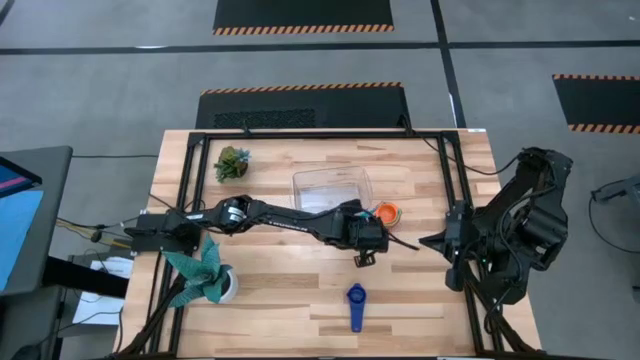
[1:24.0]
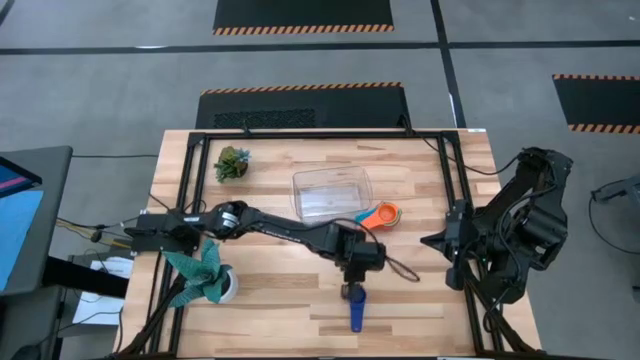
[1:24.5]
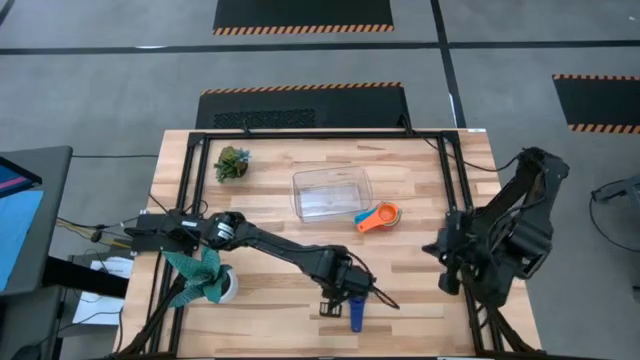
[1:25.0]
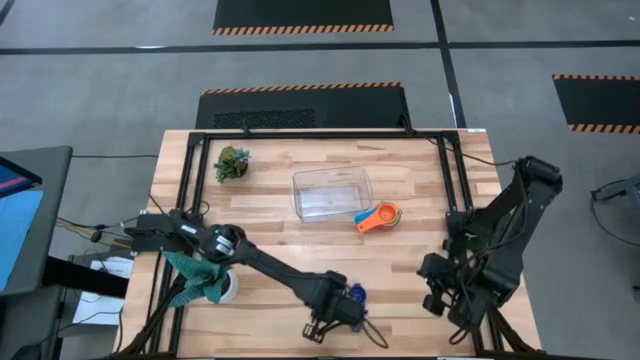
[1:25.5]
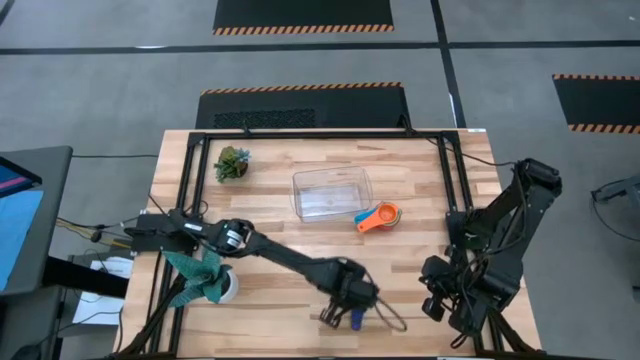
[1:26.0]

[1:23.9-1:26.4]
Task: Nest measuring cups in basket
Stack the dark blue measuring cup on top of the orange measuring cup

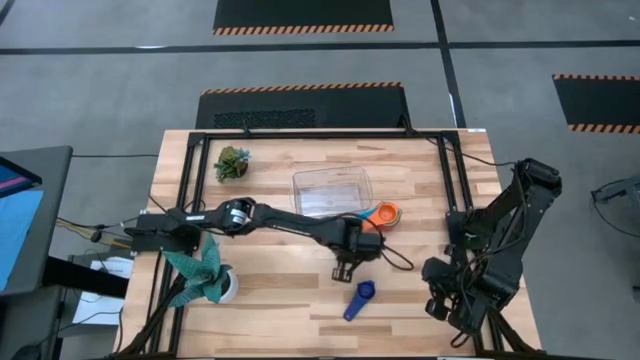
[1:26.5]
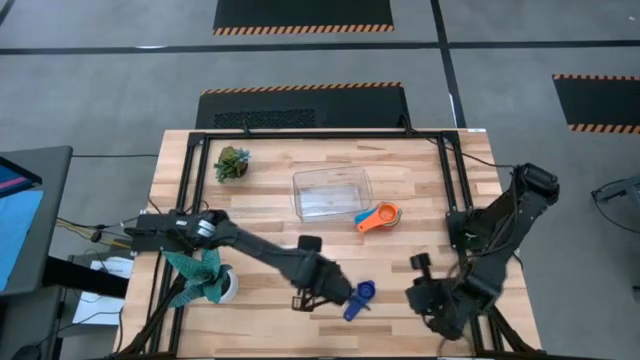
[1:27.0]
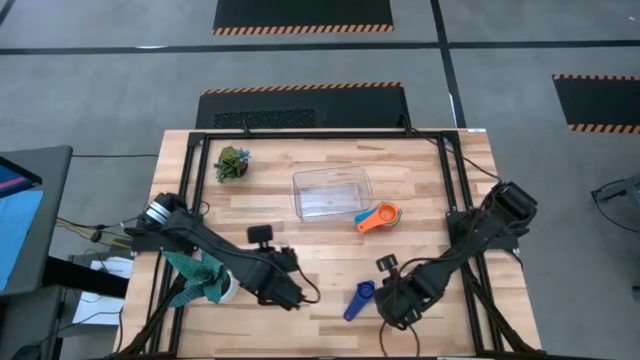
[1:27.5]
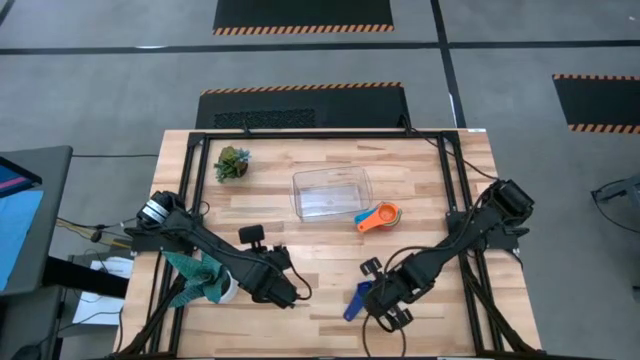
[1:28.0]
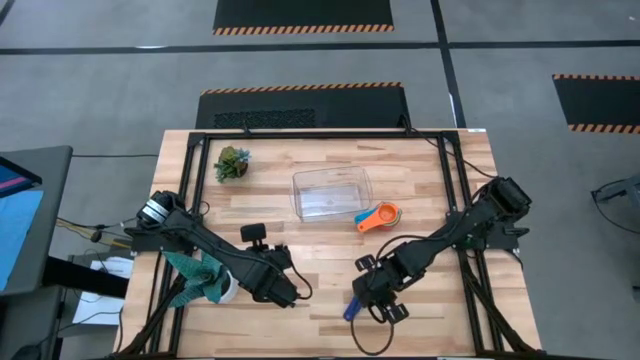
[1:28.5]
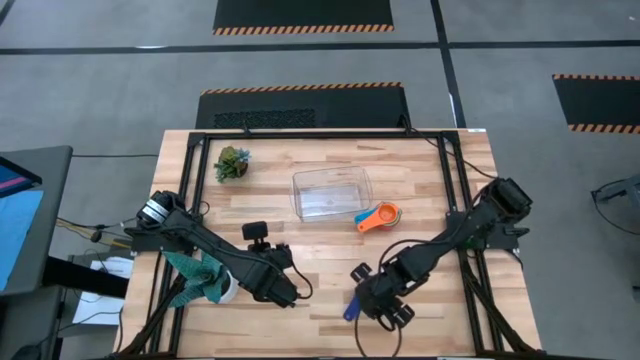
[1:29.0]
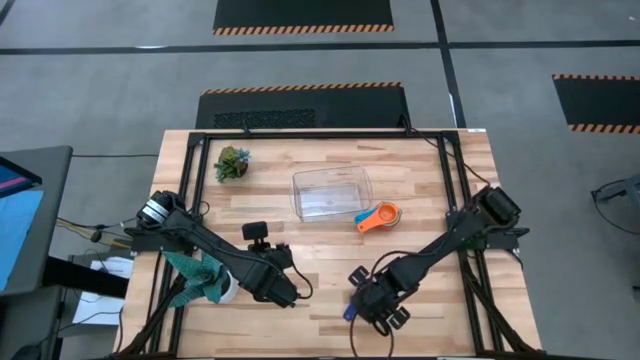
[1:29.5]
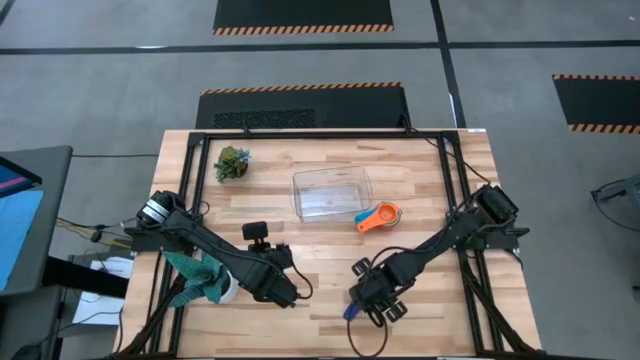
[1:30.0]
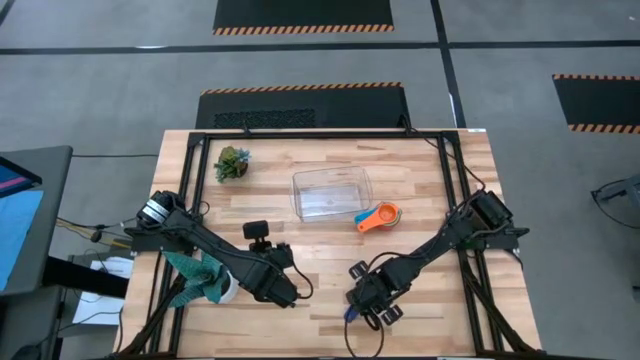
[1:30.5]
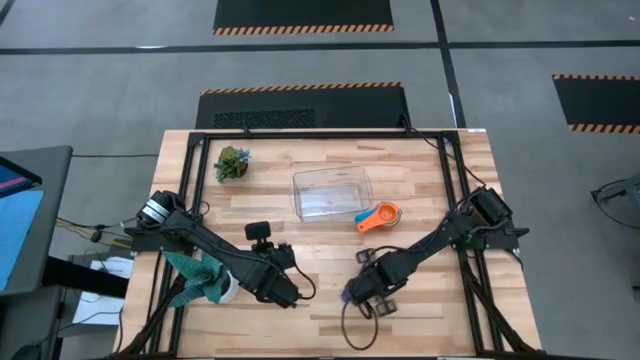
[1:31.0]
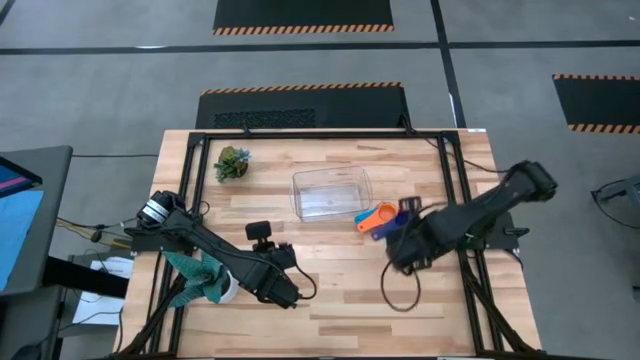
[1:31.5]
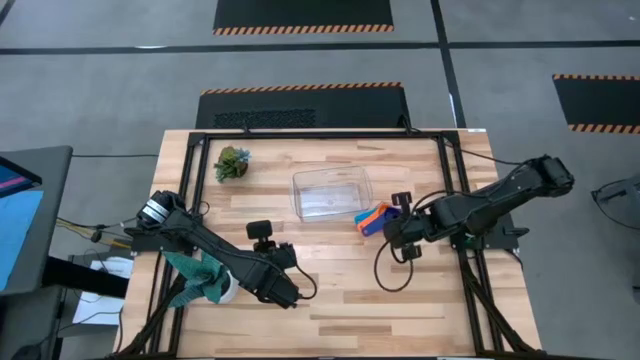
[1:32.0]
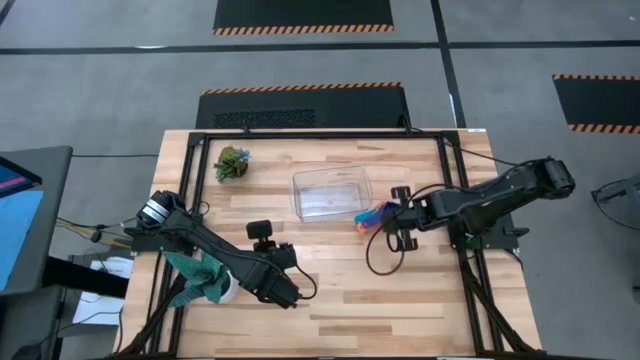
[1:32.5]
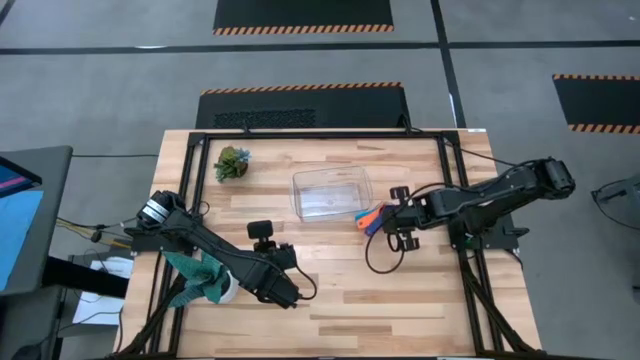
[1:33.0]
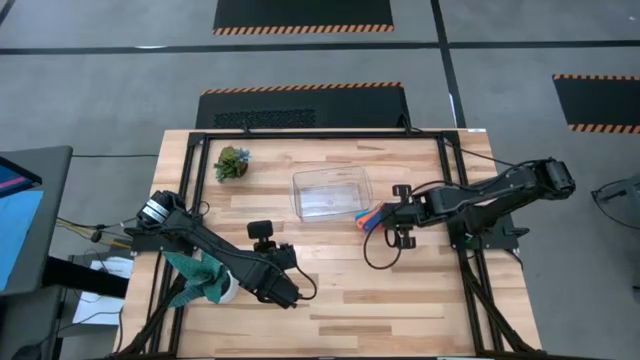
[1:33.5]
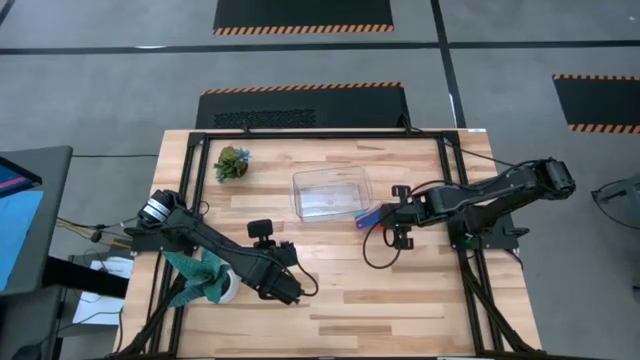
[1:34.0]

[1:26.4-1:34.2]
Stack the dark blue measuring cup on top of the orange measuring cup

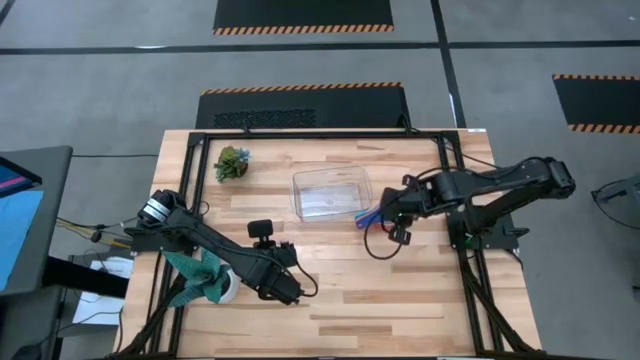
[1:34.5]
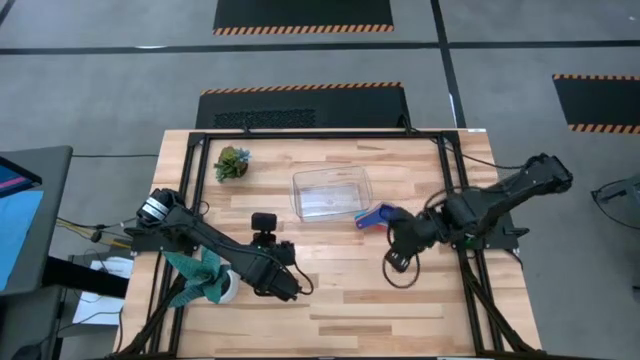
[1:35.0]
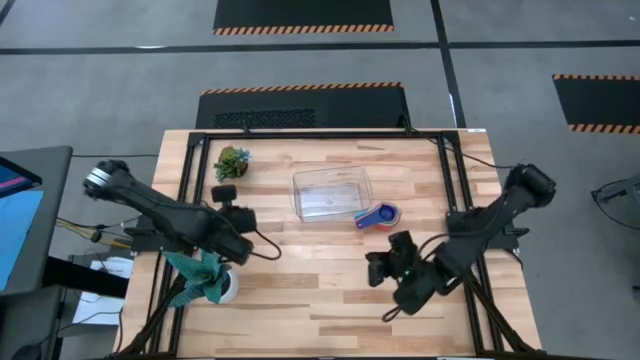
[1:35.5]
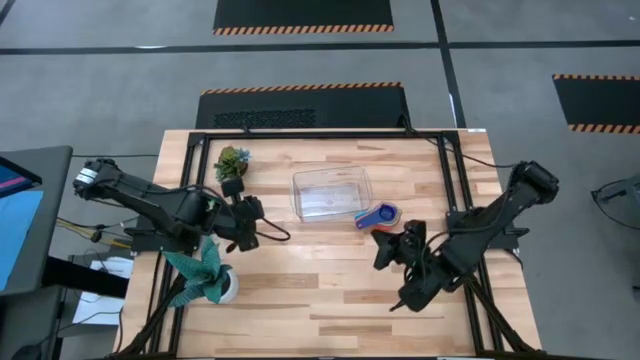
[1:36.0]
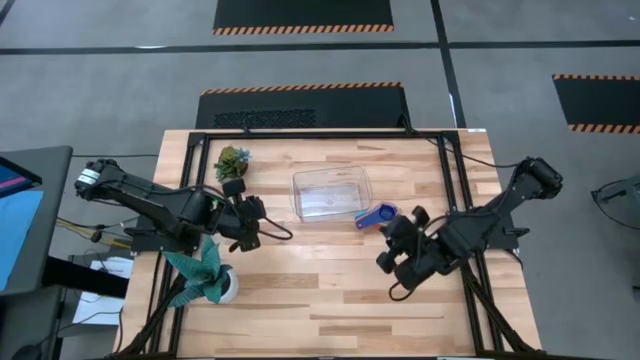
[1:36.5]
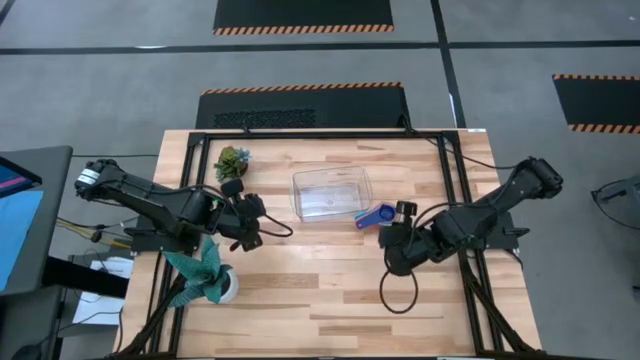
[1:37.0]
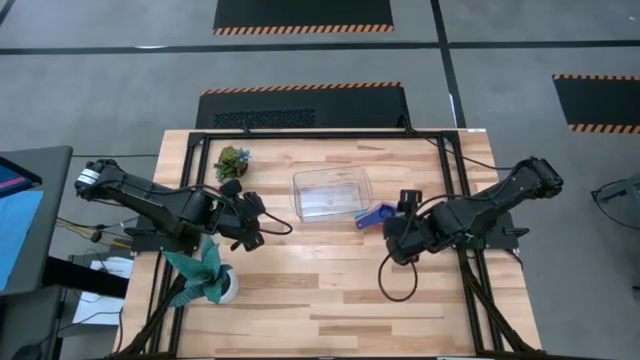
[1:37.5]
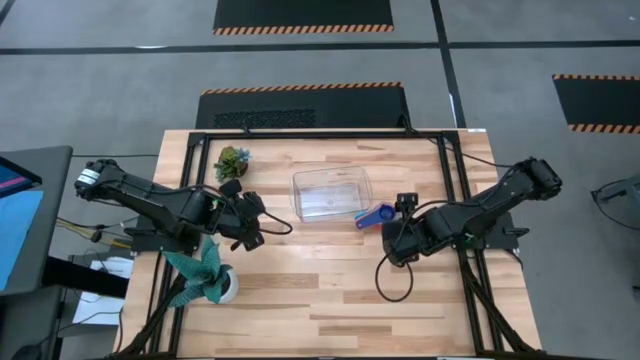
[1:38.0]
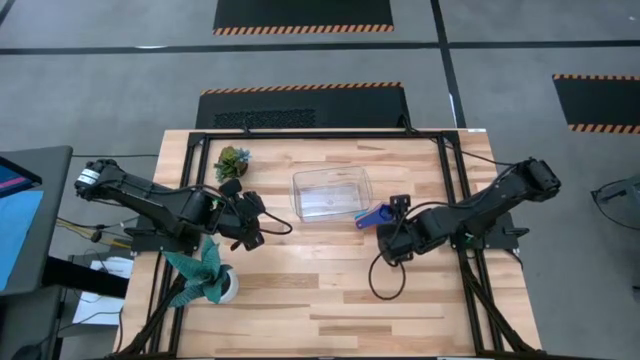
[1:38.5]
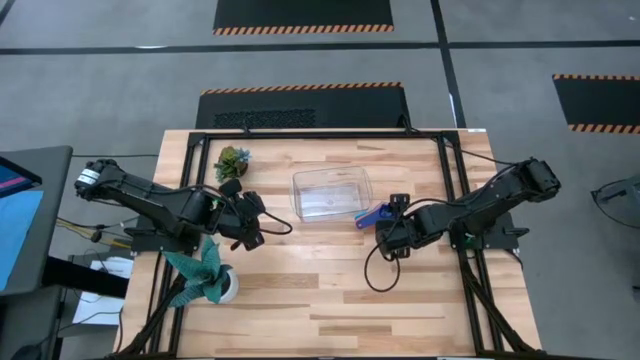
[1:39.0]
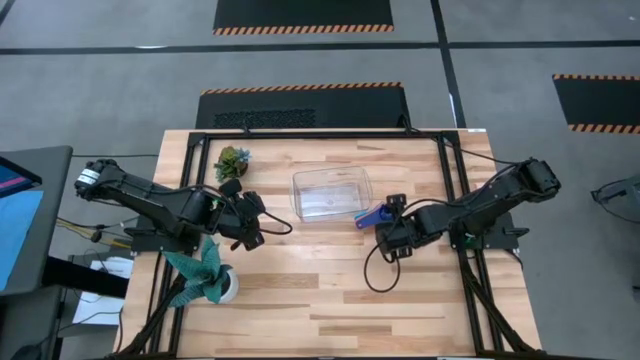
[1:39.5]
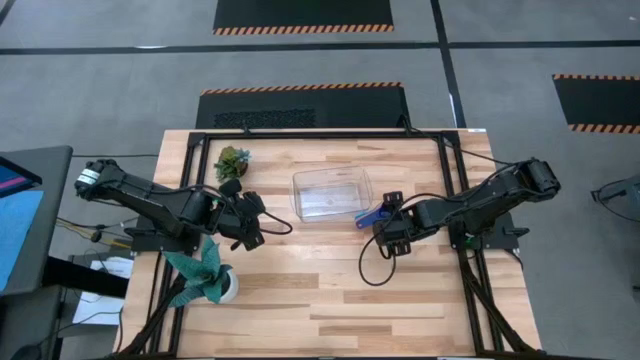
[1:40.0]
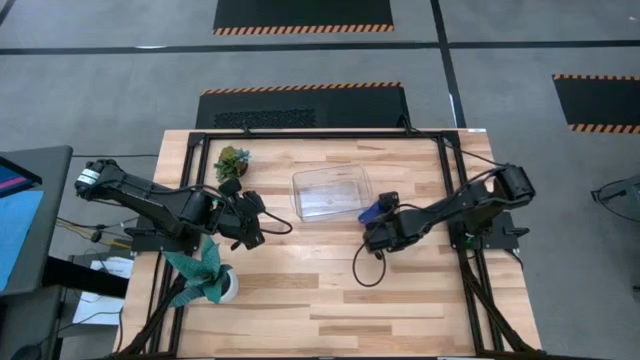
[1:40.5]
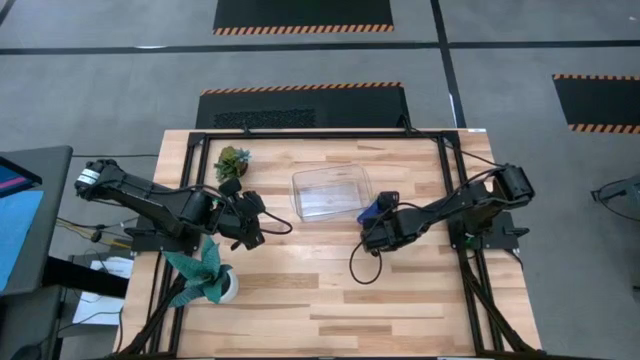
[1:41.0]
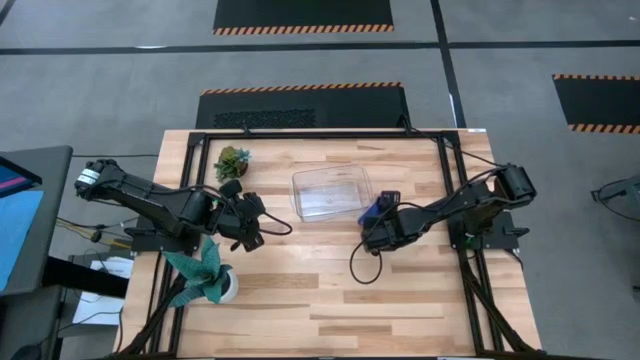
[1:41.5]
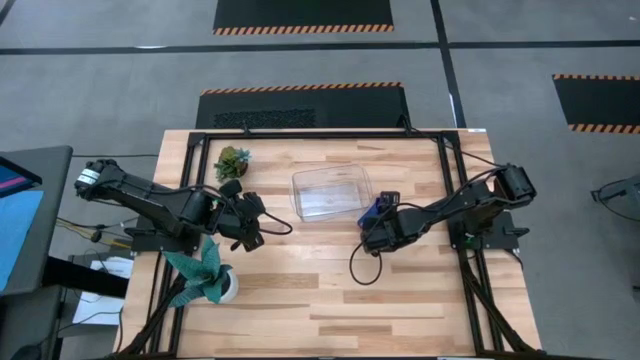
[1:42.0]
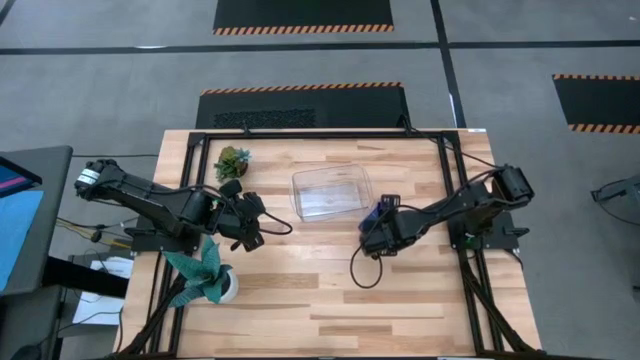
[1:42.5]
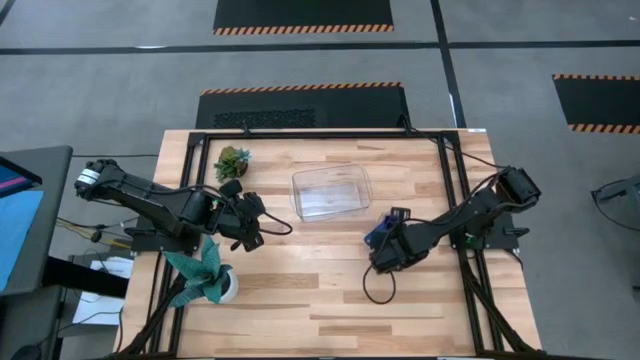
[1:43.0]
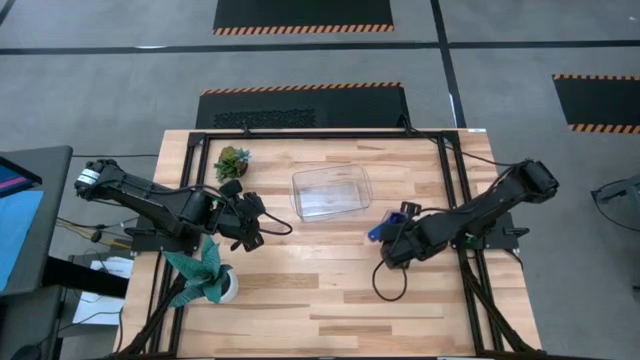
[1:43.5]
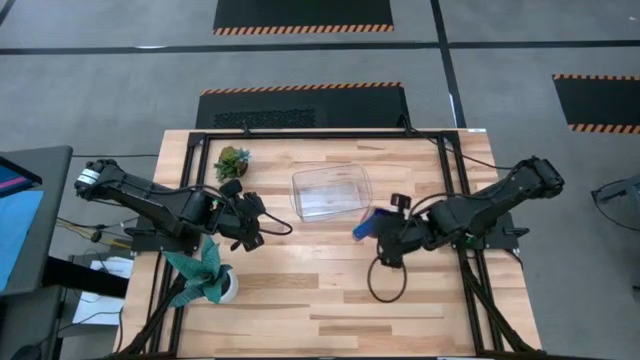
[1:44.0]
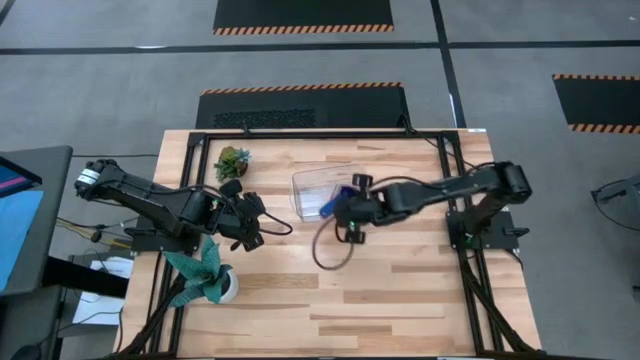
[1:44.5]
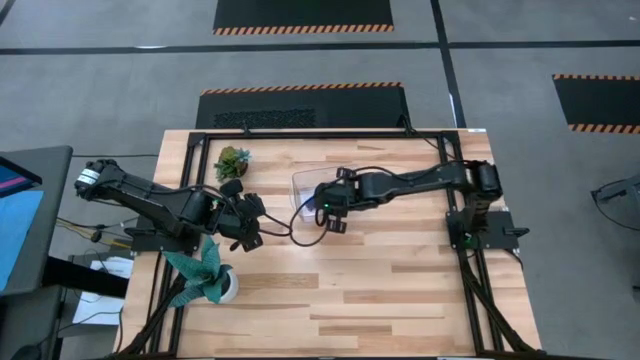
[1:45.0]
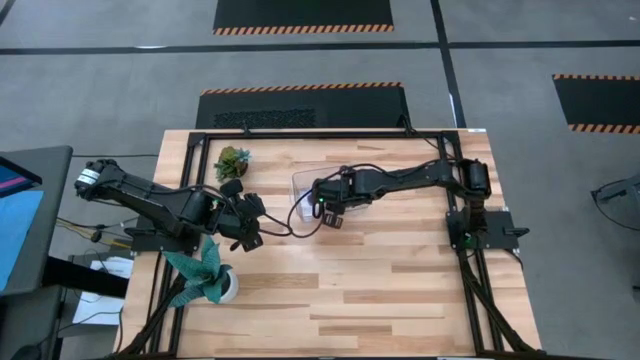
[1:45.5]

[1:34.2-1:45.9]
Put the nested measuring cups into the transparent bin
